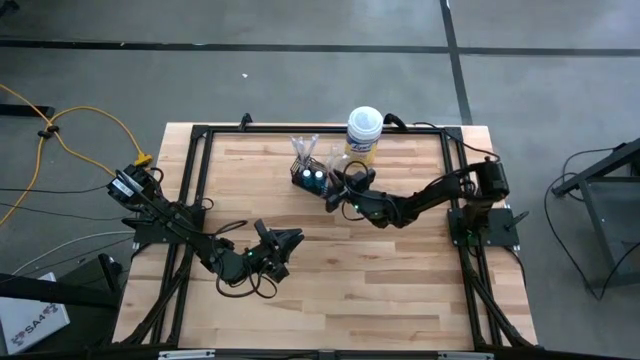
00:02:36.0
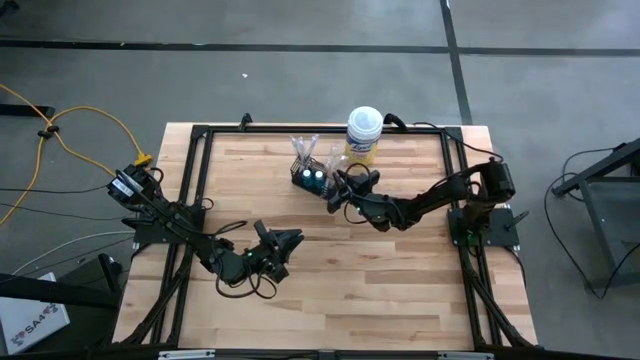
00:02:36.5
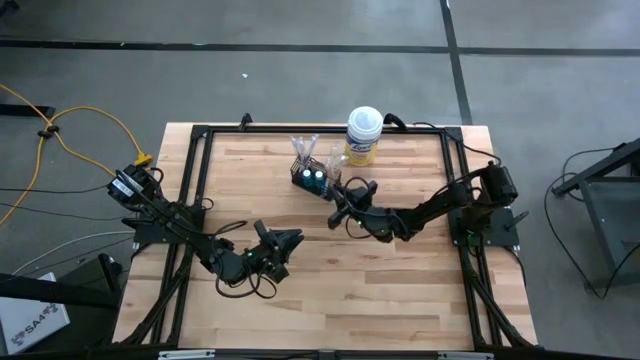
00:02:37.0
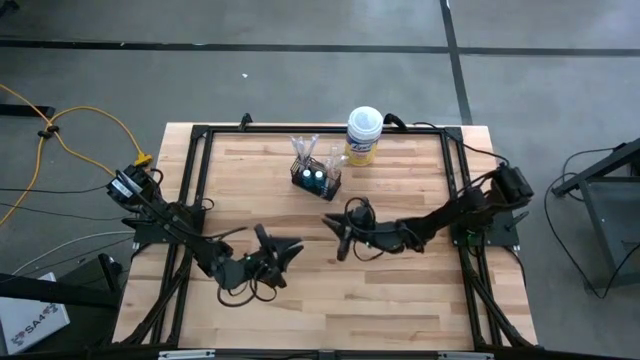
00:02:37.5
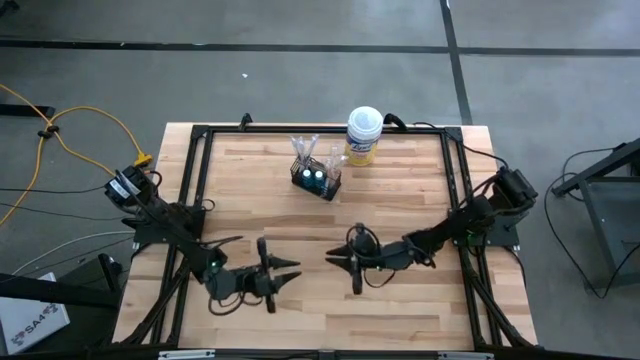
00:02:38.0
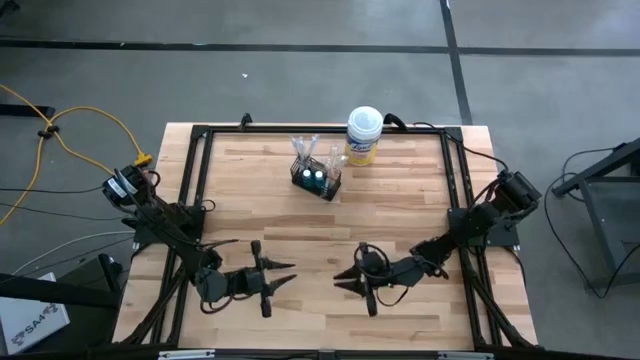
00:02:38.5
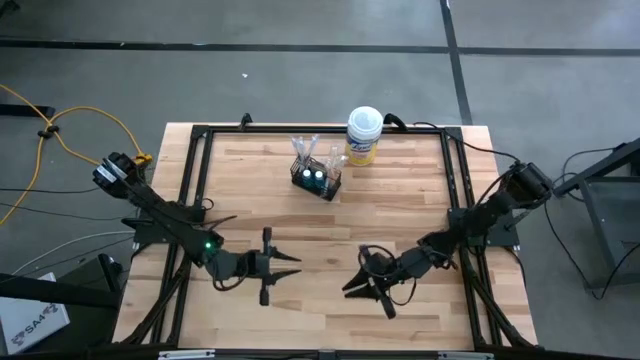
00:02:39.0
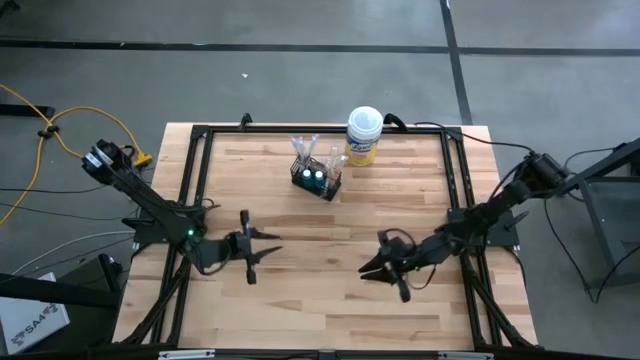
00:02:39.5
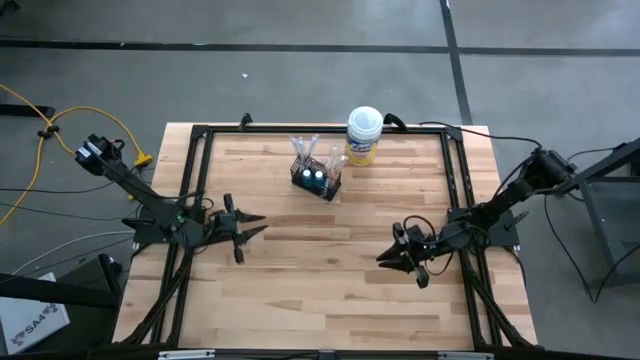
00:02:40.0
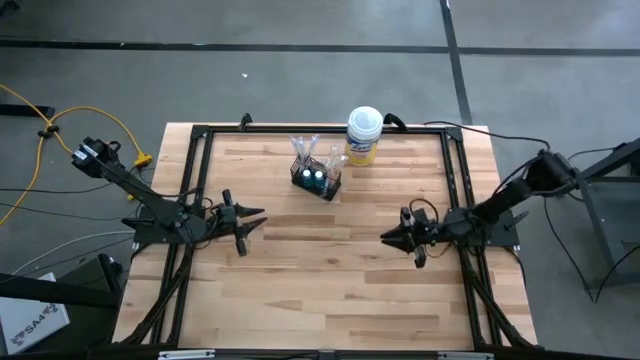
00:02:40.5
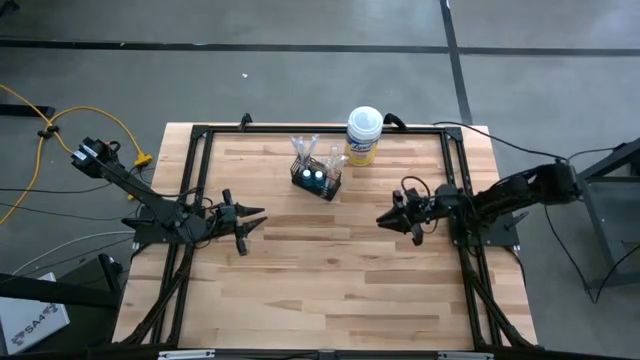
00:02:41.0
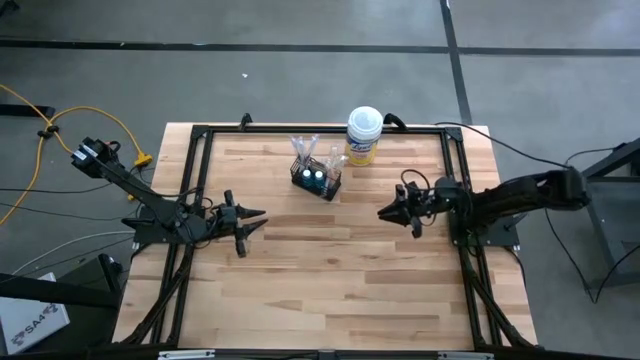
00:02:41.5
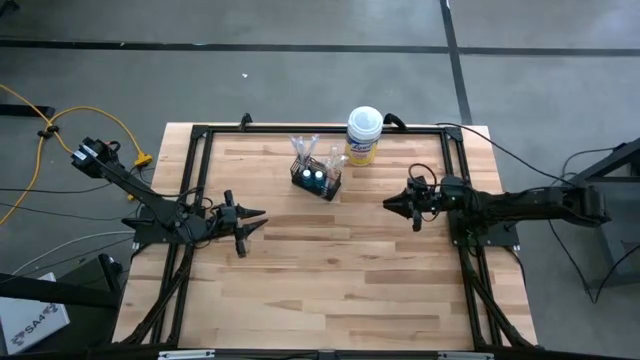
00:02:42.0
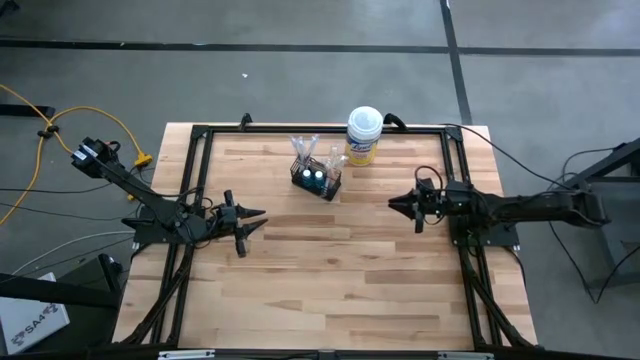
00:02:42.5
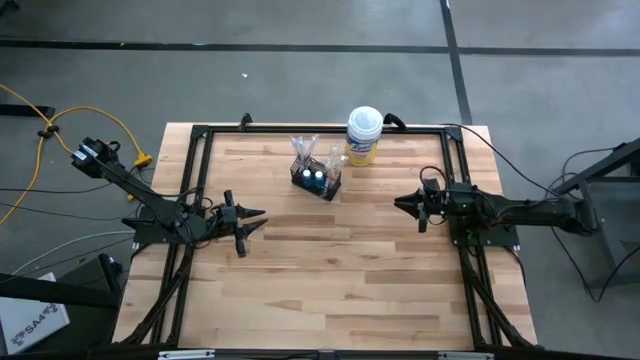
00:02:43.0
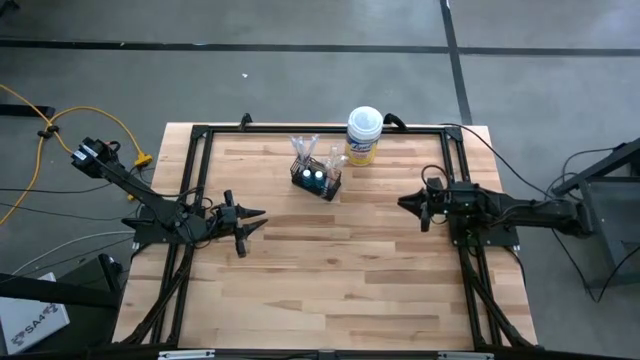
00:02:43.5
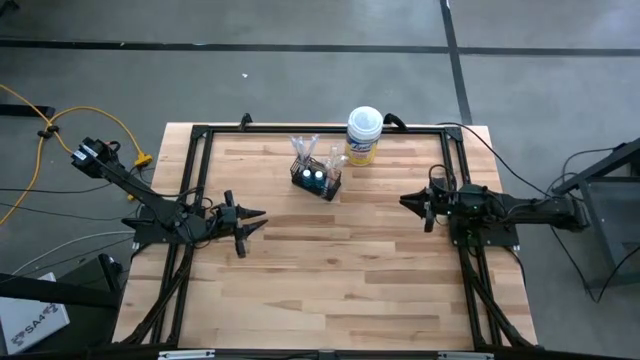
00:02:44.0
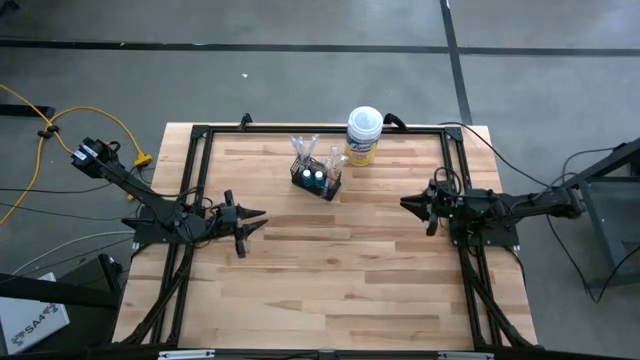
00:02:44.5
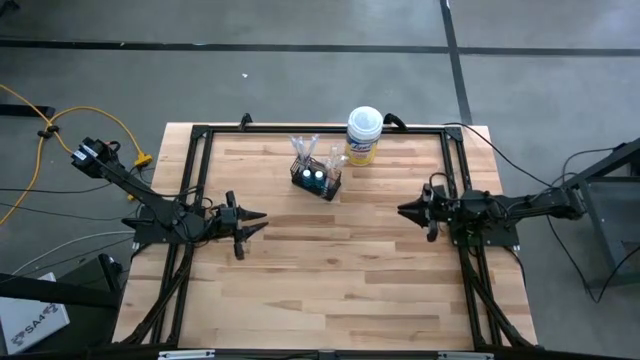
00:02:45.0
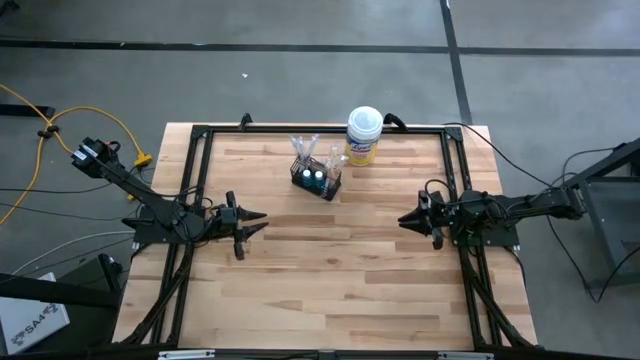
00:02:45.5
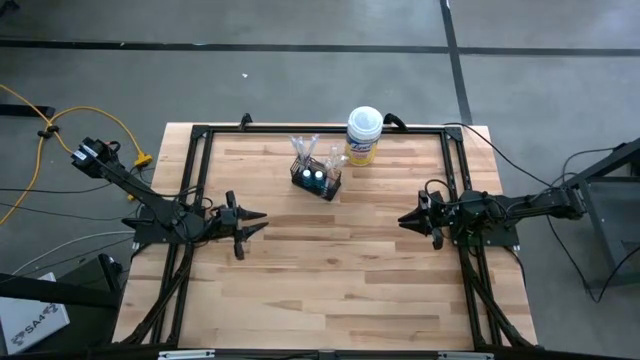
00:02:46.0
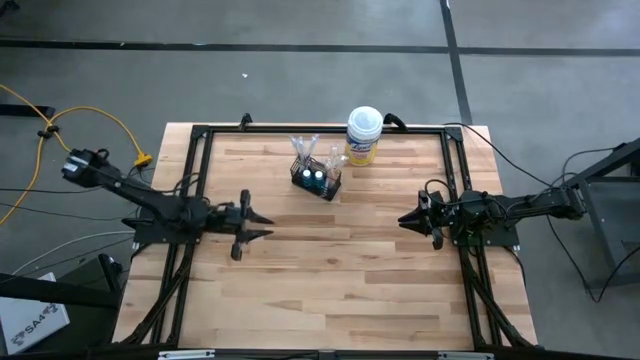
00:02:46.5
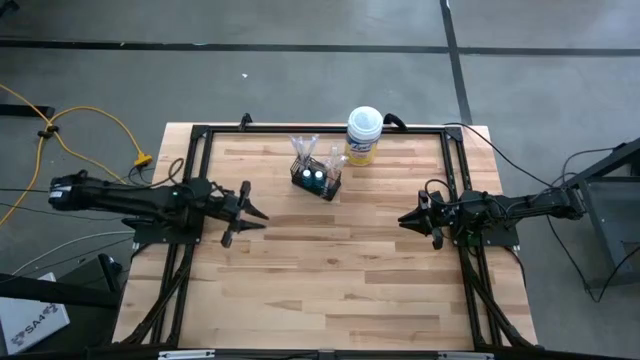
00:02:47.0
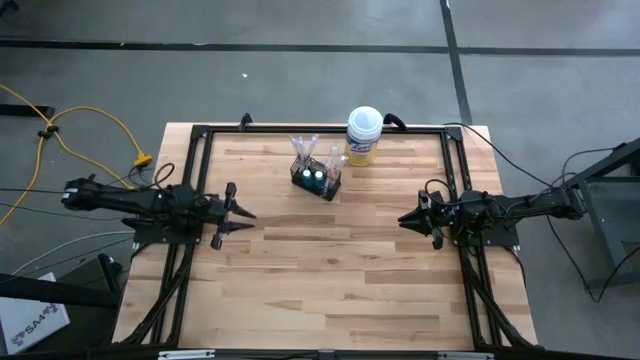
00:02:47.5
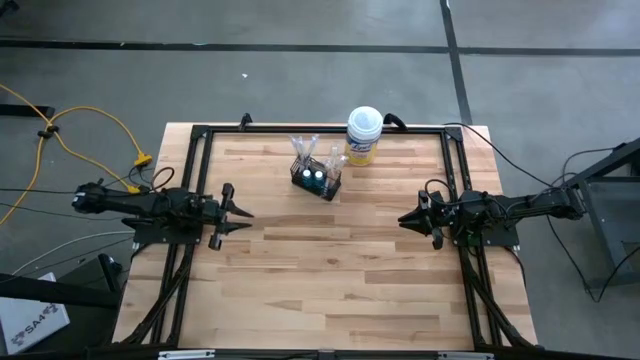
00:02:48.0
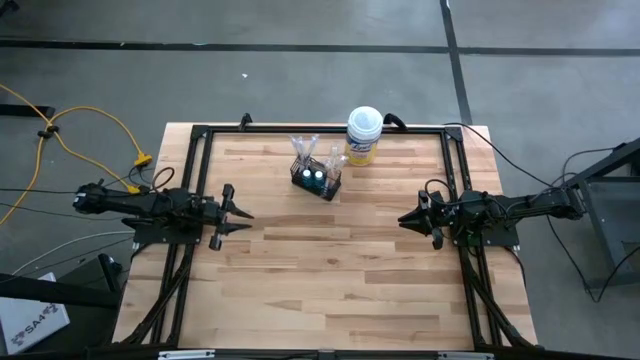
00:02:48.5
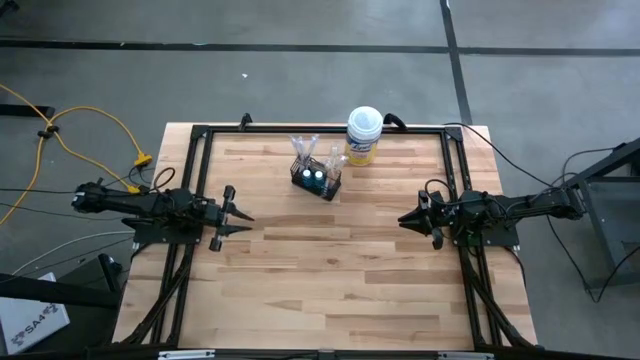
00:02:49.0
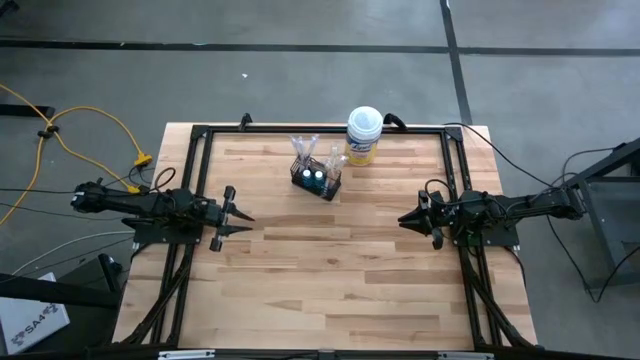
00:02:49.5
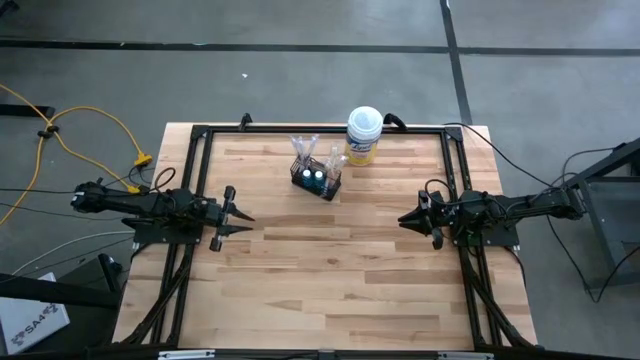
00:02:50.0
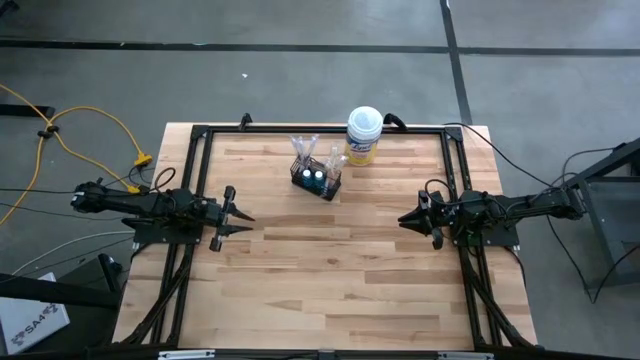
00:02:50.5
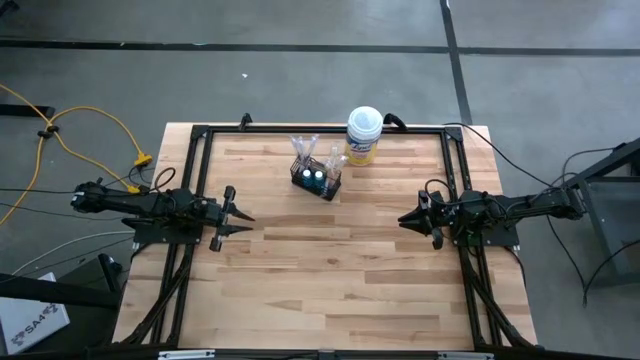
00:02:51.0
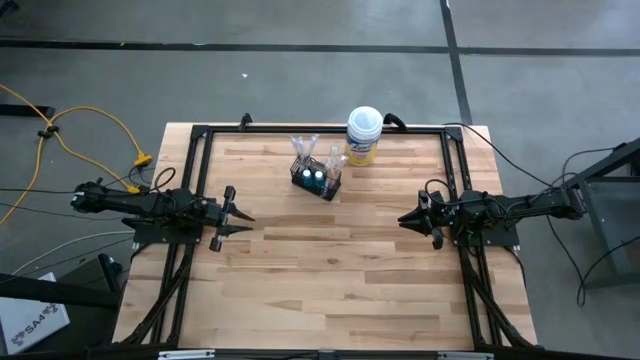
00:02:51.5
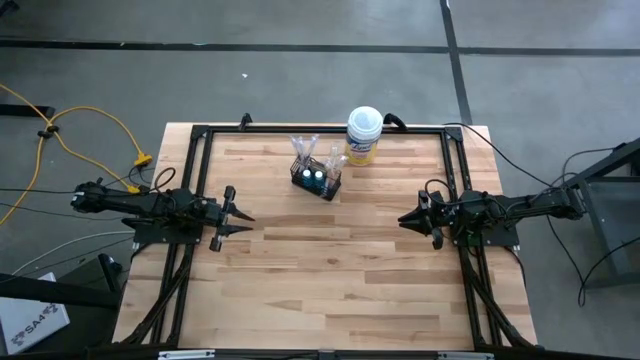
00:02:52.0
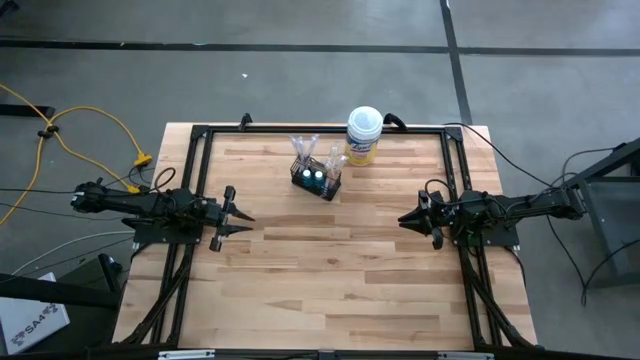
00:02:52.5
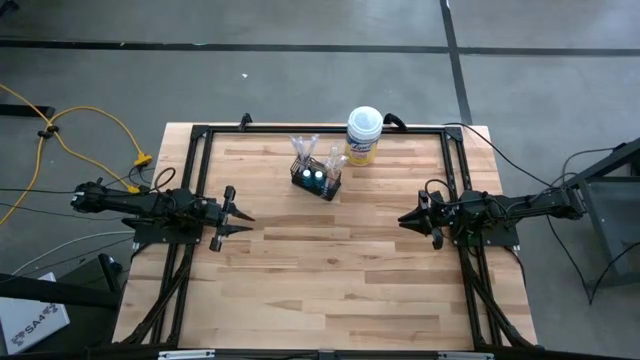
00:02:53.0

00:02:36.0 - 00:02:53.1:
Task: Pick & Place toothbrushing station
Return to Home Position
